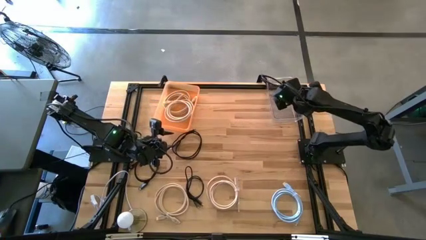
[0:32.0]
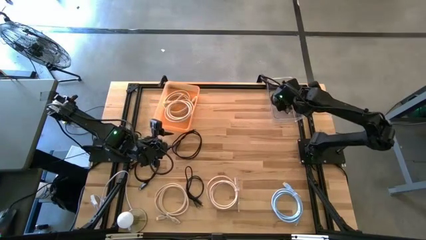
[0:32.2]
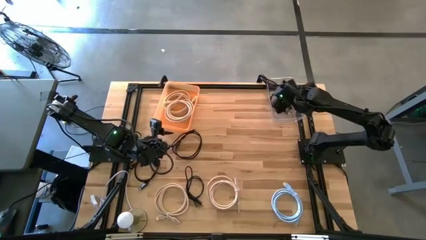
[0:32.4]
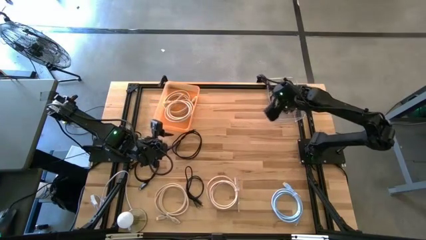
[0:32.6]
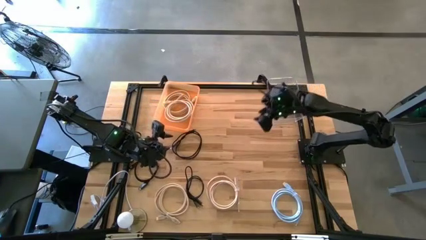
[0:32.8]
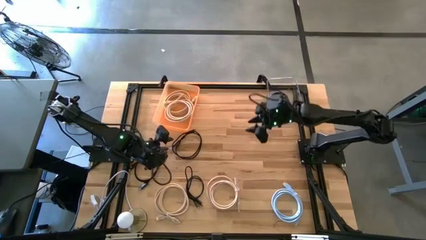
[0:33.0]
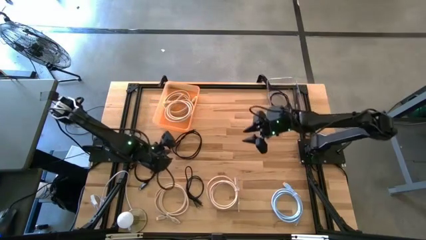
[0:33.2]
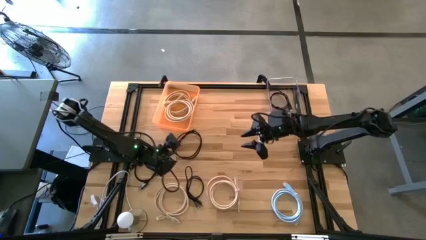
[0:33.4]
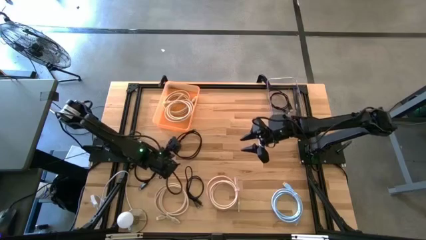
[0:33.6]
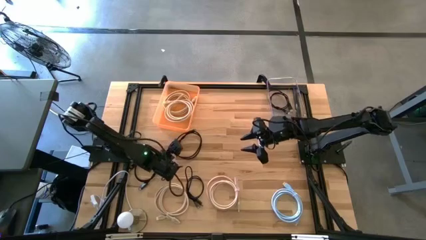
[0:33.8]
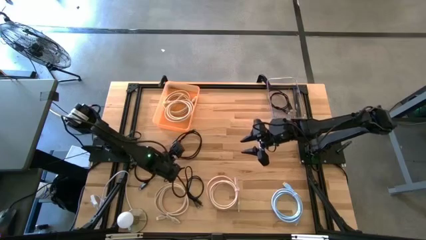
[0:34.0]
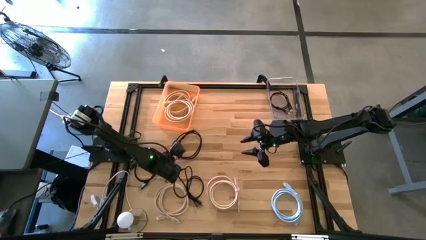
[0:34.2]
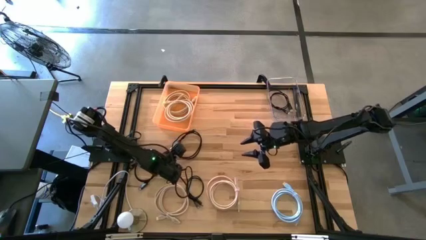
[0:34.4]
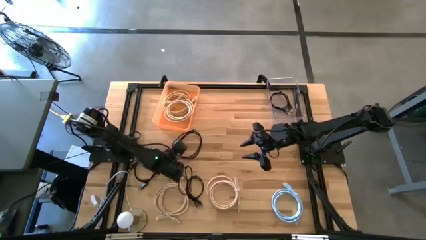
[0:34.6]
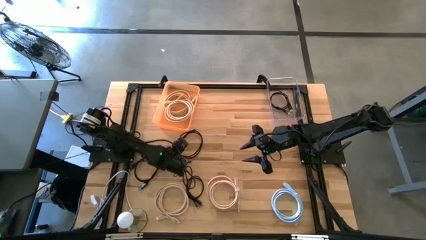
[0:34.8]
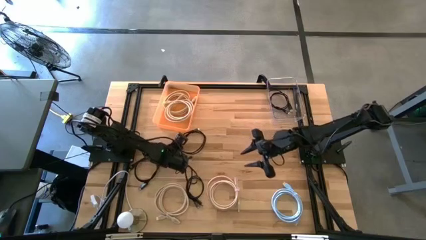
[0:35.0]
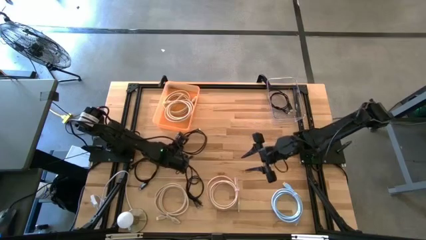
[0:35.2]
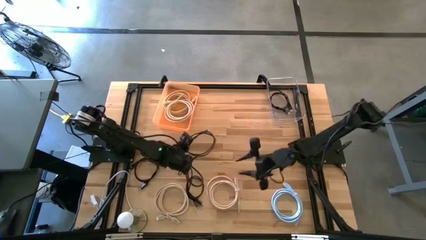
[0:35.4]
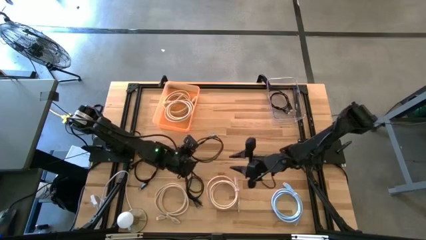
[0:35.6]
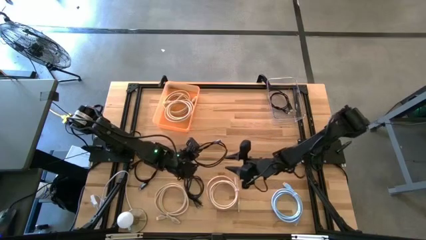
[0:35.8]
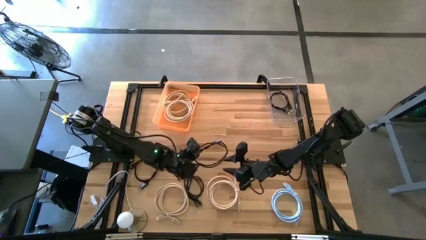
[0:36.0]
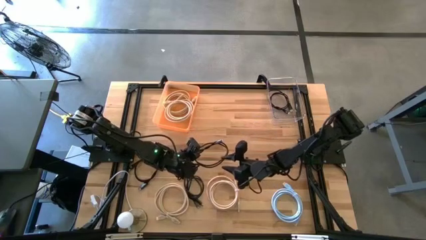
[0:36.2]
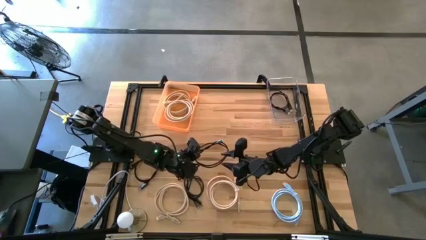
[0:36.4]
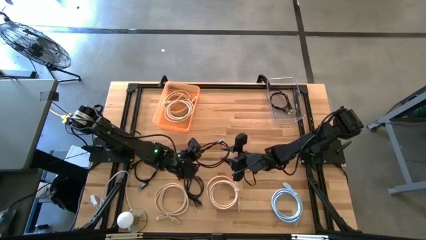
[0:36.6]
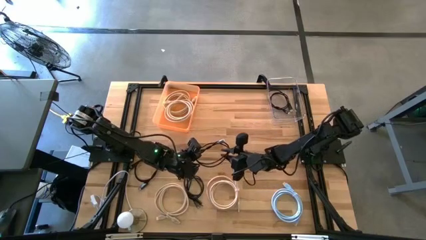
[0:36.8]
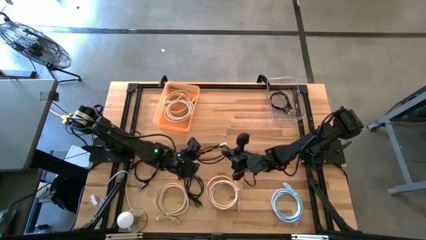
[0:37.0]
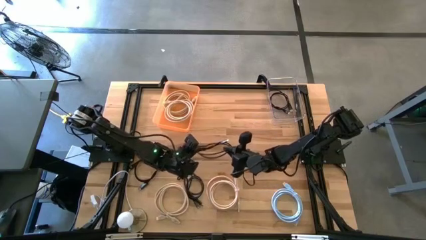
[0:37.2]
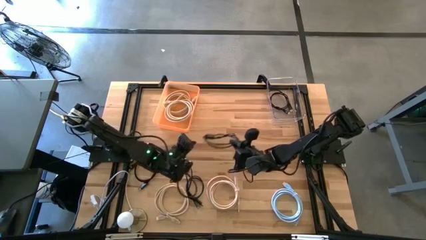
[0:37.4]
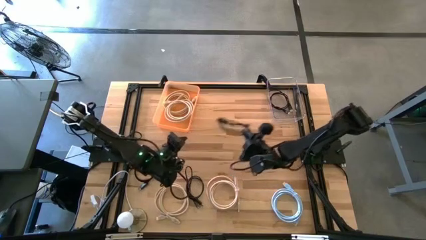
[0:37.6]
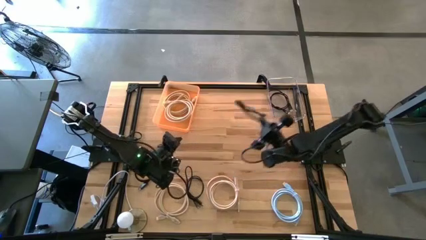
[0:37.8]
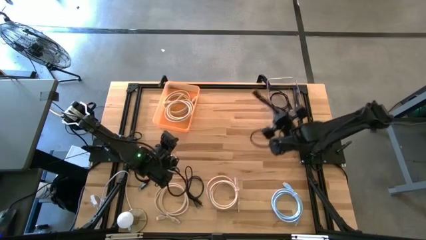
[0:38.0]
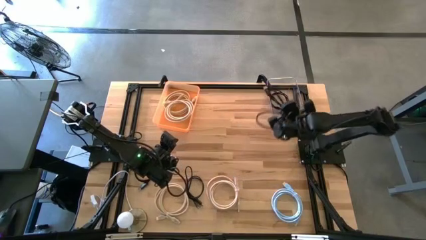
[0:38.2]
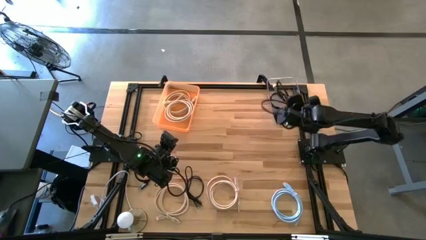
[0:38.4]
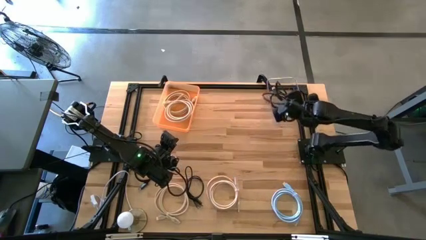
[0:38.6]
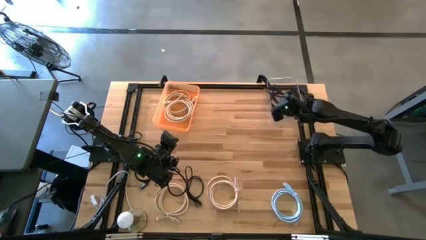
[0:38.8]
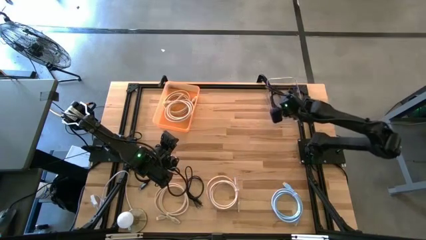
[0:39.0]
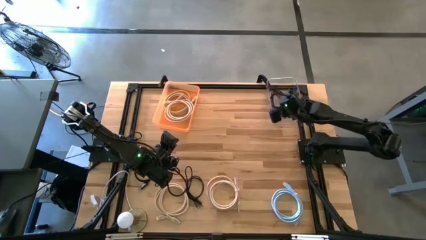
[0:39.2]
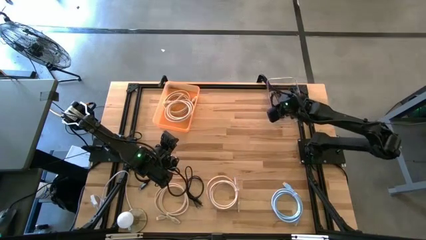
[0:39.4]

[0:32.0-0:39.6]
Task: Pick & Place USB Port
Put the black charger cable into the transparent bin

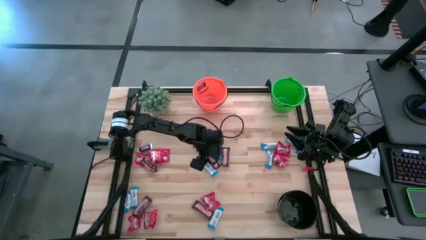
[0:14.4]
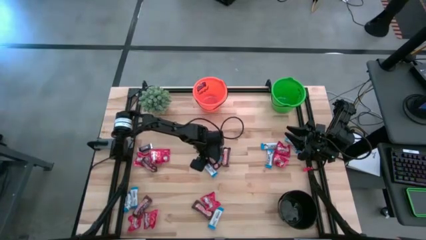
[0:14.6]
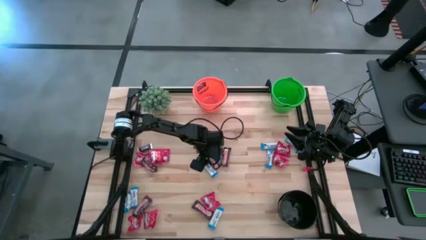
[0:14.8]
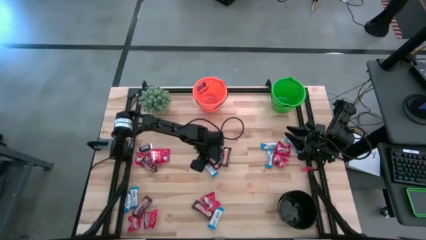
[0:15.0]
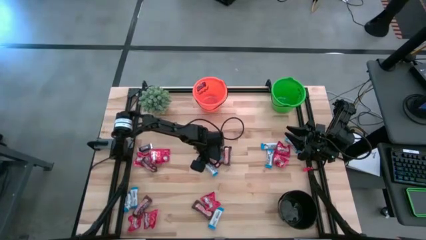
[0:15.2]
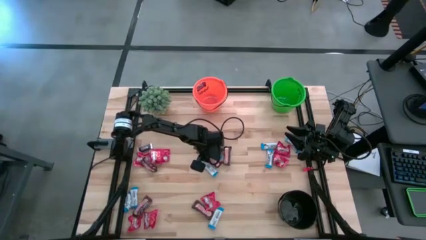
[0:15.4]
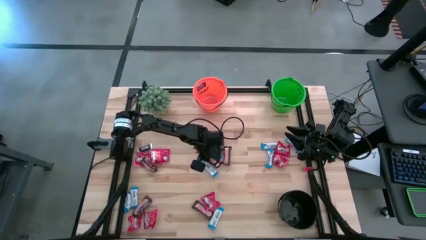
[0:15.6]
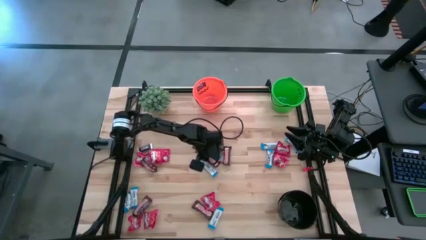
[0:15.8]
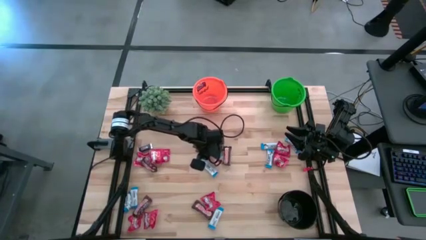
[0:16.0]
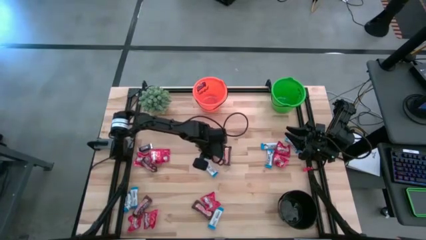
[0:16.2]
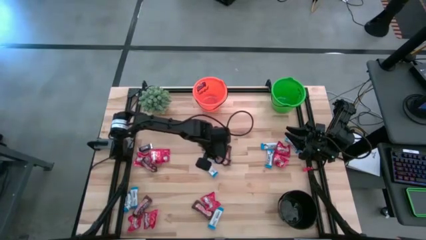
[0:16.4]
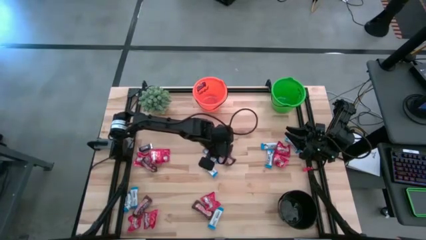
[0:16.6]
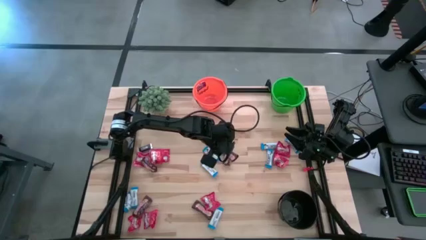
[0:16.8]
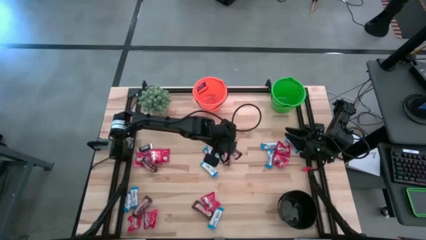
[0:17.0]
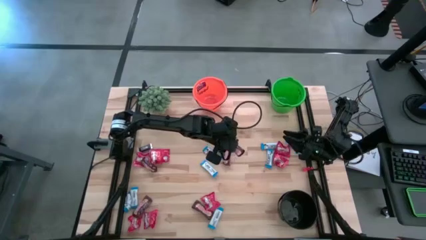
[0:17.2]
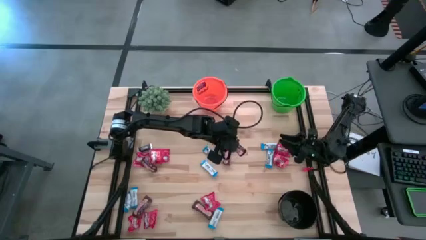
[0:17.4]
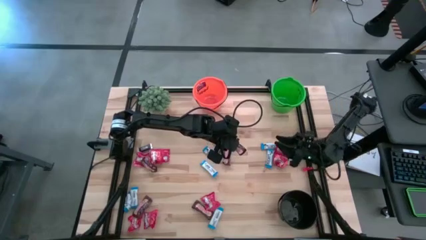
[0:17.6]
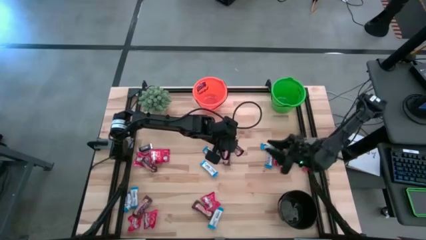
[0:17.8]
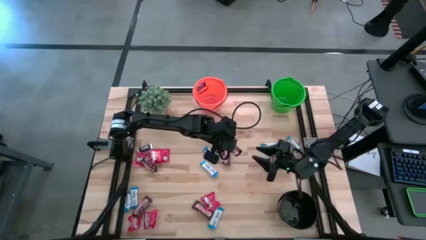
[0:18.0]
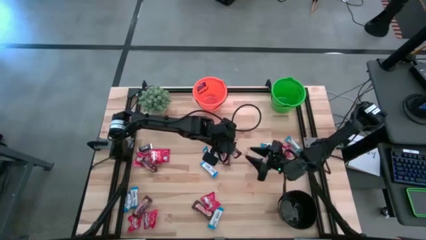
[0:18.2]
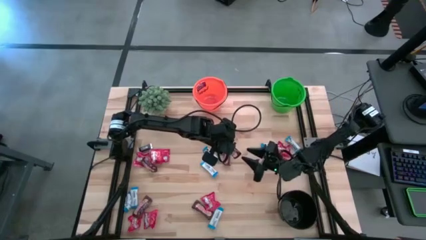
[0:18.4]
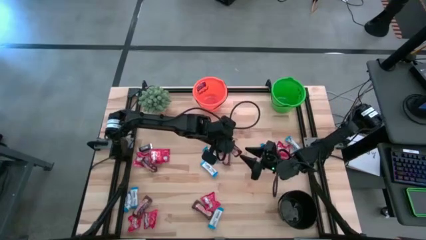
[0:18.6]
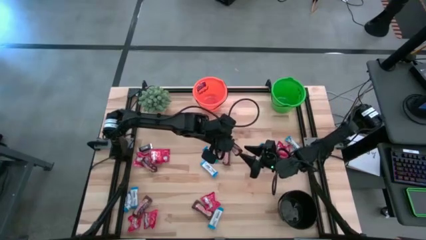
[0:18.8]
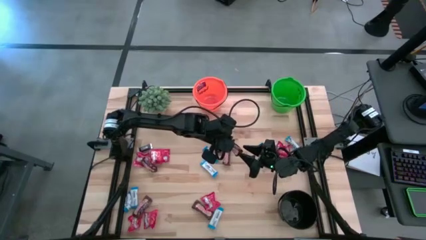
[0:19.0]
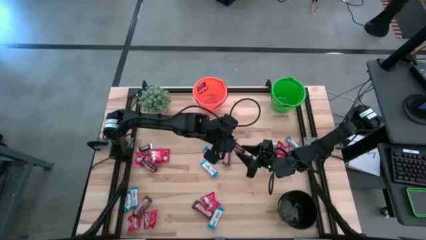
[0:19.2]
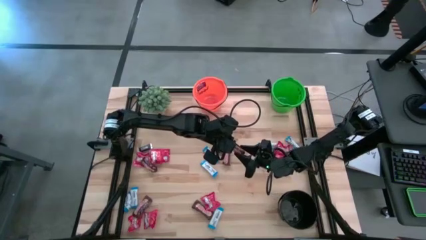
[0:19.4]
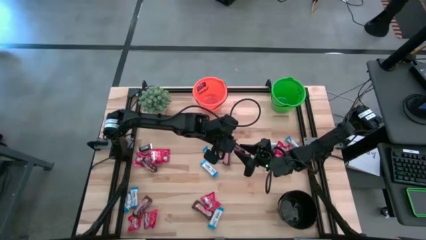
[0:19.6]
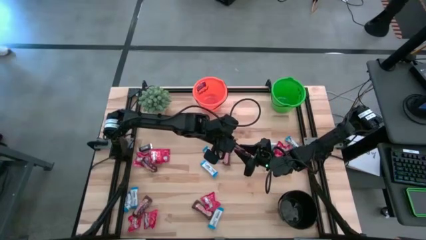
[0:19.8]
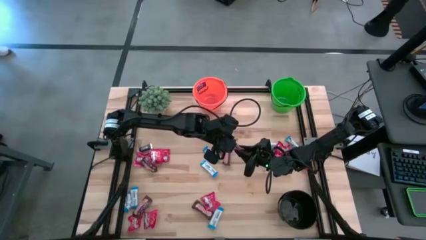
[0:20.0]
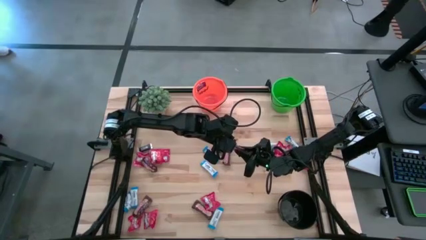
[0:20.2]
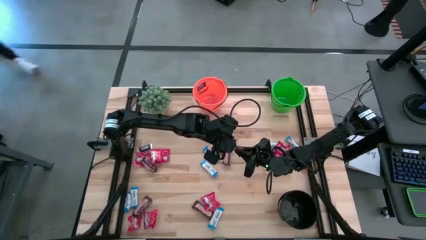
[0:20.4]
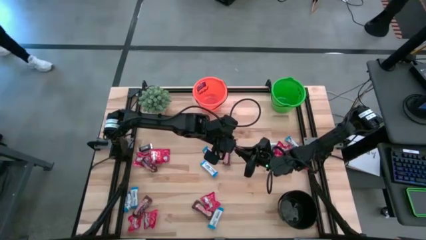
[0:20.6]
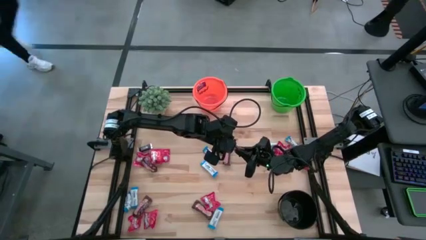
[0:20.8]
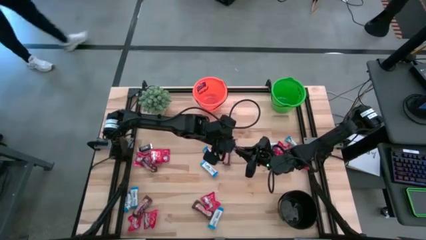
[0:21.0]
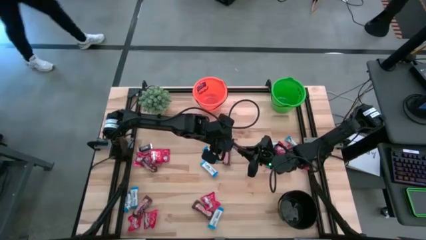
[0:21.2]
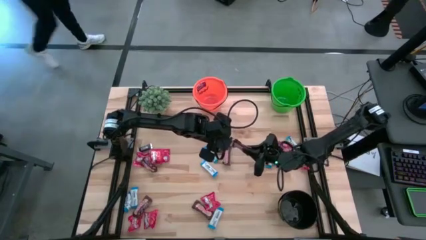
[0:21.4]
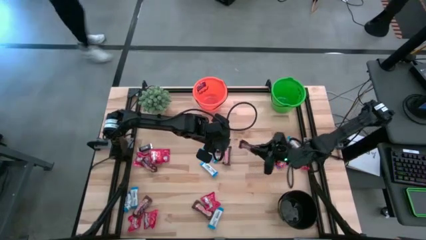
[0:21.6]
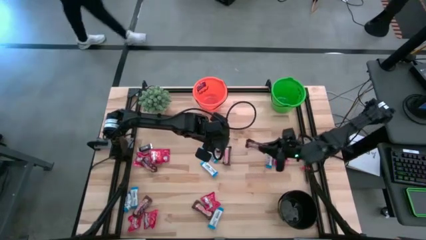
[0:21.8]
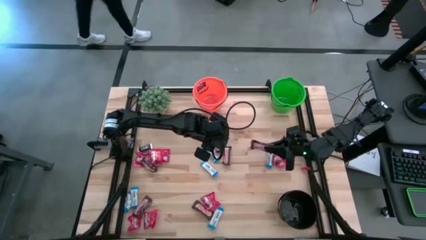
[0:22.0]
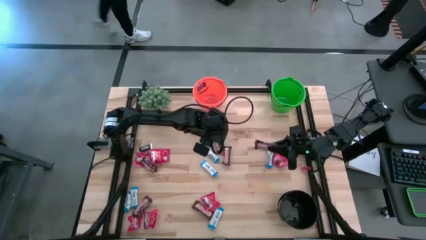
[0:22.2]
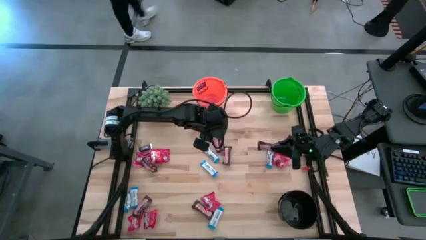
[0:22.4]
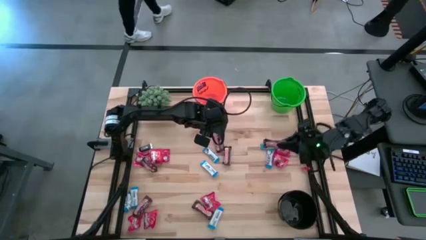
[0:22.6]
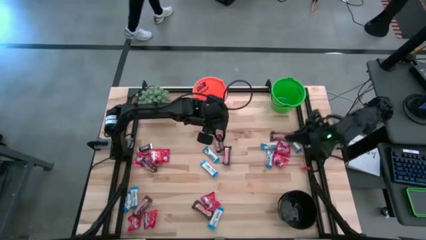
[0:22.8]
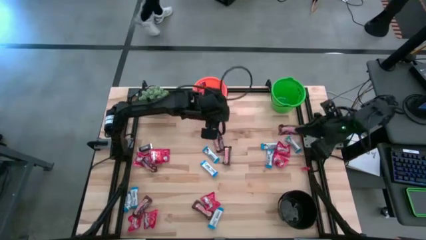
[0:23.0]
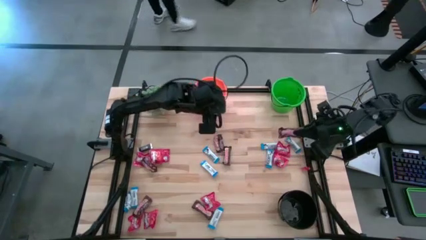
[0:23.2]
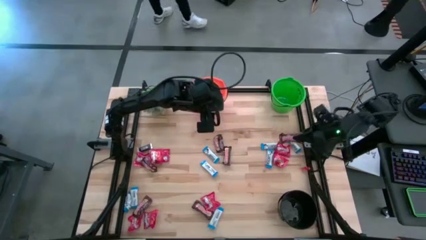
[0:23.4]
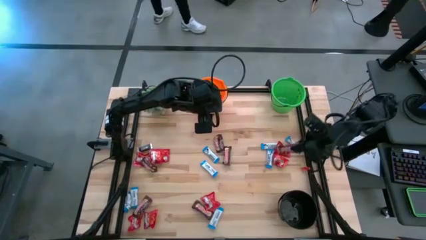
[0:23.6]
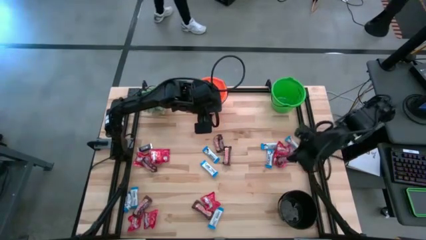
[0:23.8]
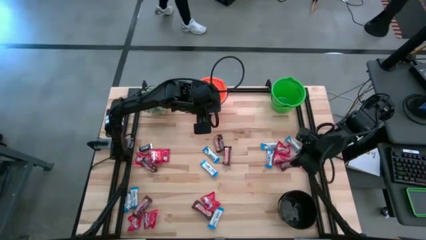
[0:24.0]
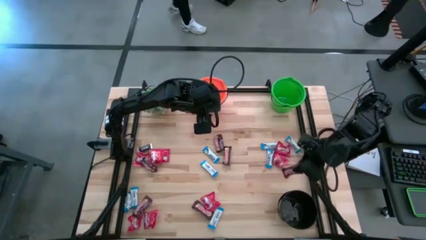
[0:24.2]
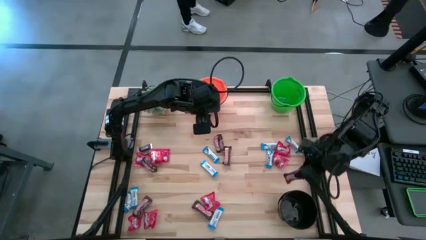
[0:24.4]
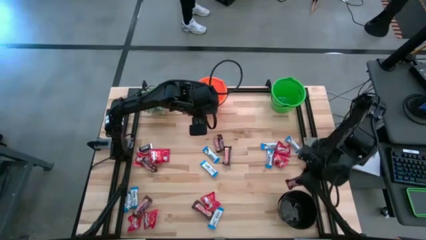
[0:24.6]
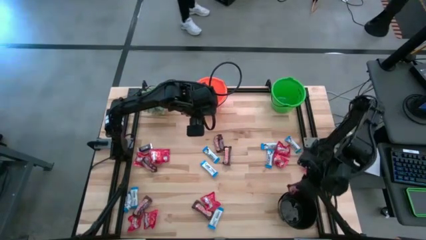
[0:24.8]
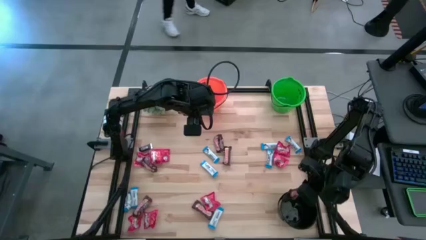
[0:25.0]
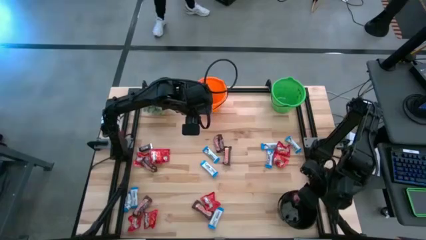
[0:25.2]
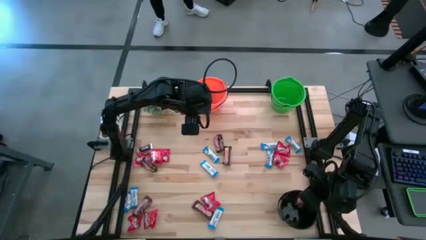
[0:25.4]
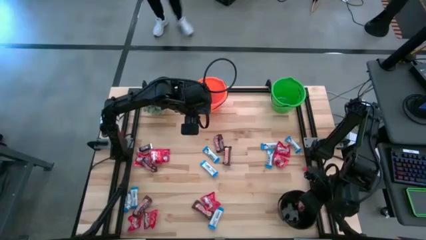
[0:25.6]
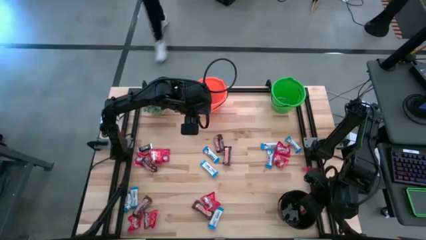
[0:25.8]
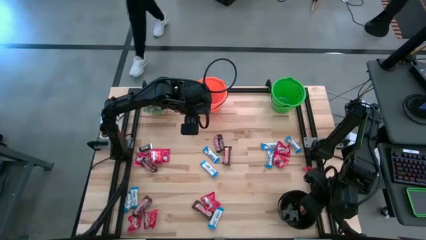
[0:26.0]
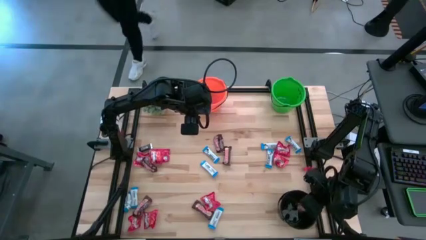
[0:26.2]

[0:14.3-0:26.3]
Task: Organize candy in baskets
Put the brown chocolate bar into the black bucket
